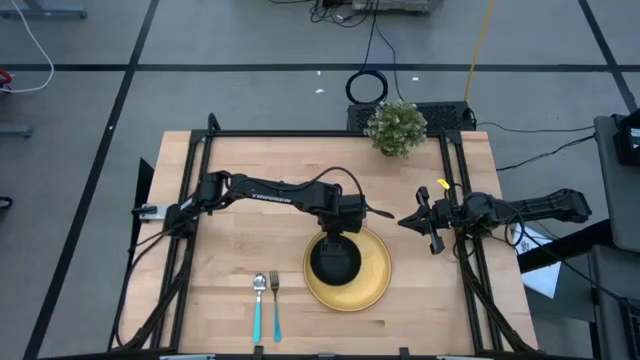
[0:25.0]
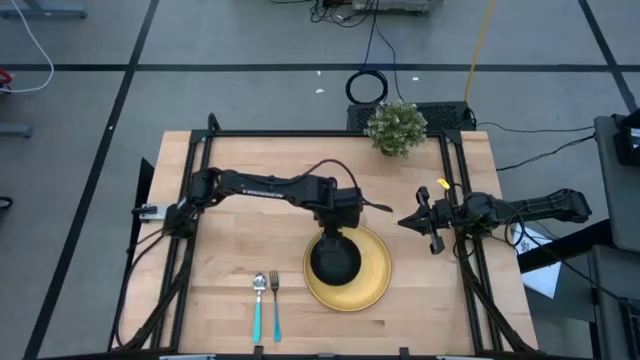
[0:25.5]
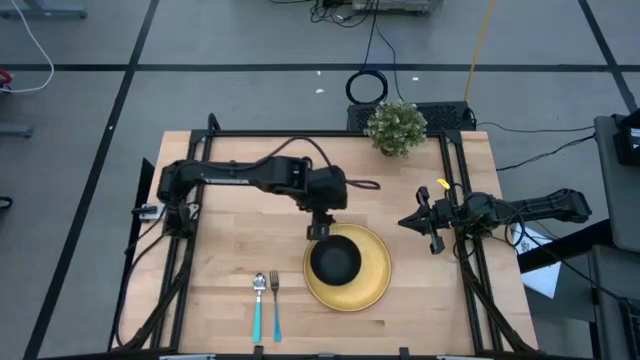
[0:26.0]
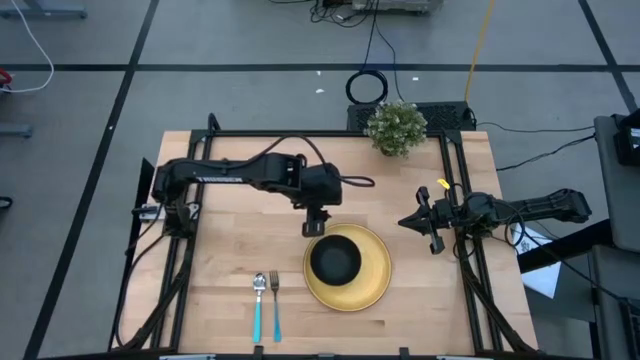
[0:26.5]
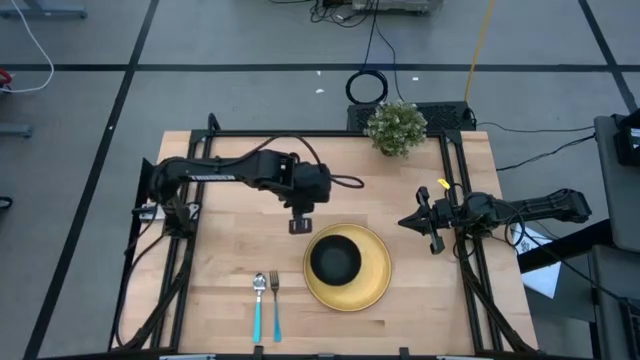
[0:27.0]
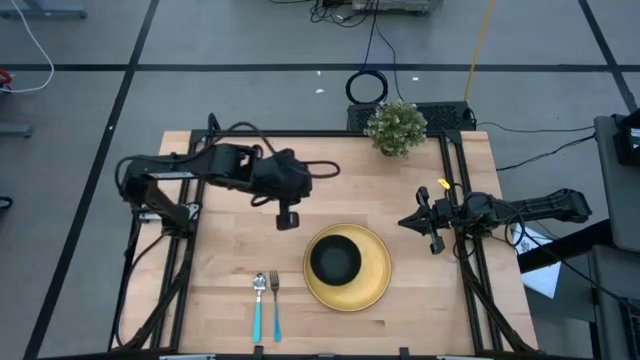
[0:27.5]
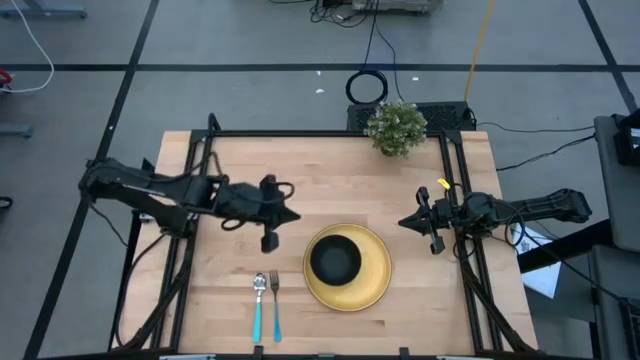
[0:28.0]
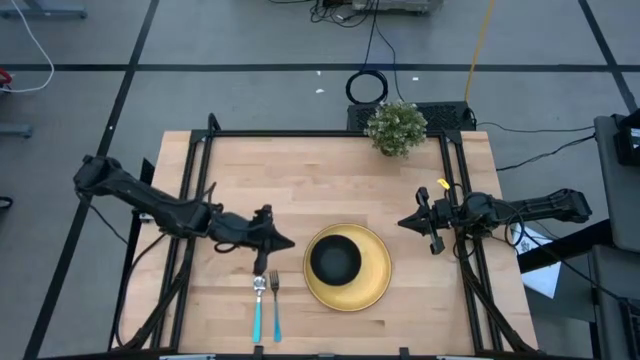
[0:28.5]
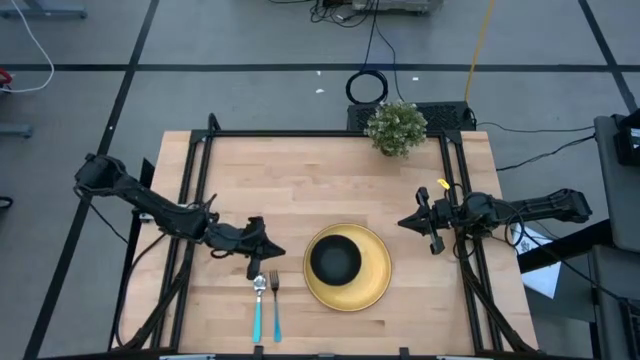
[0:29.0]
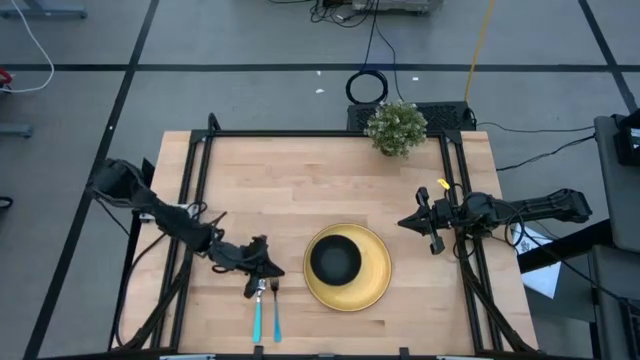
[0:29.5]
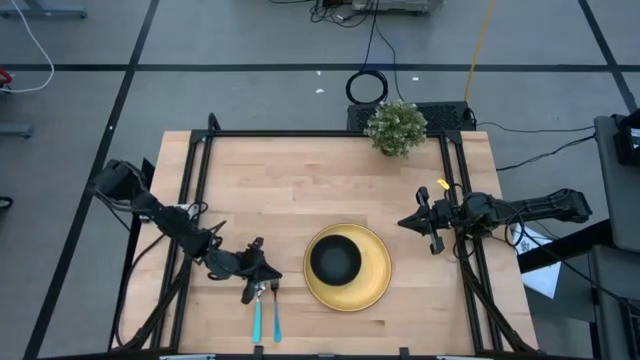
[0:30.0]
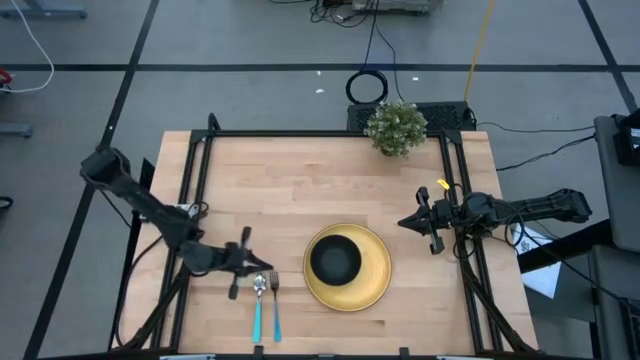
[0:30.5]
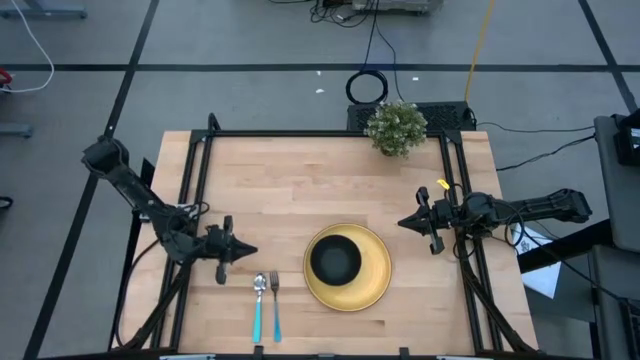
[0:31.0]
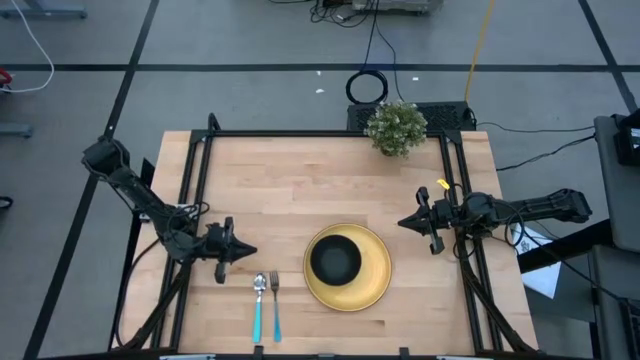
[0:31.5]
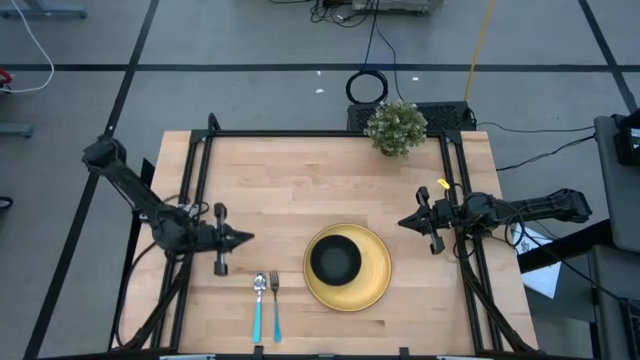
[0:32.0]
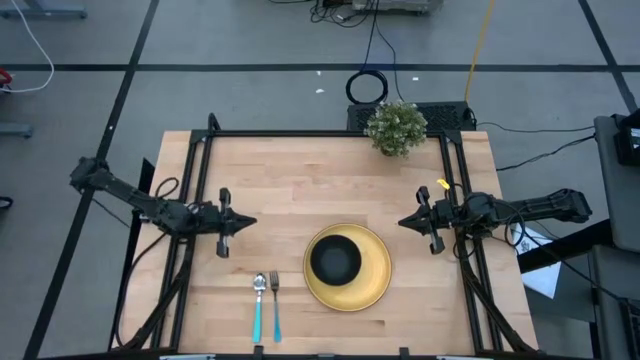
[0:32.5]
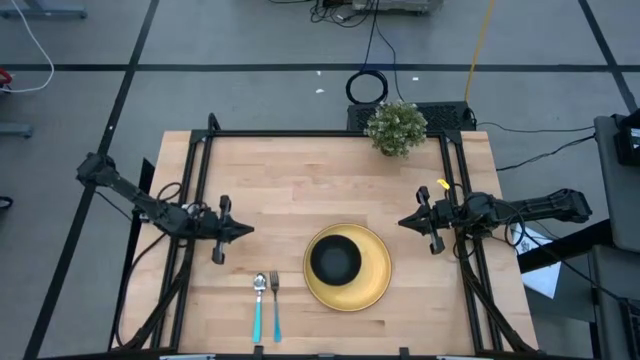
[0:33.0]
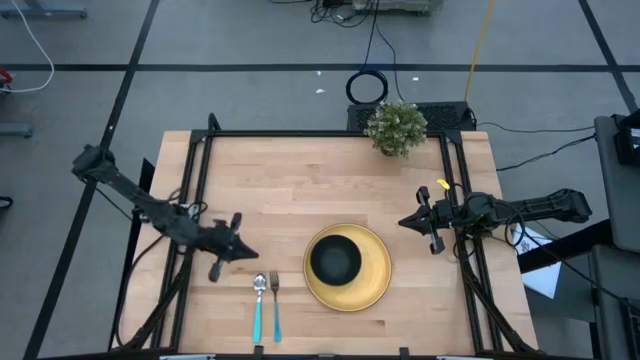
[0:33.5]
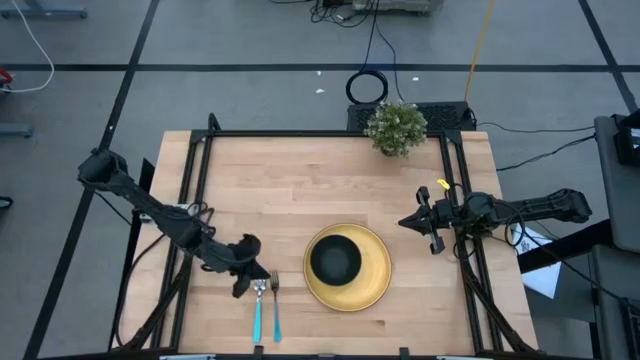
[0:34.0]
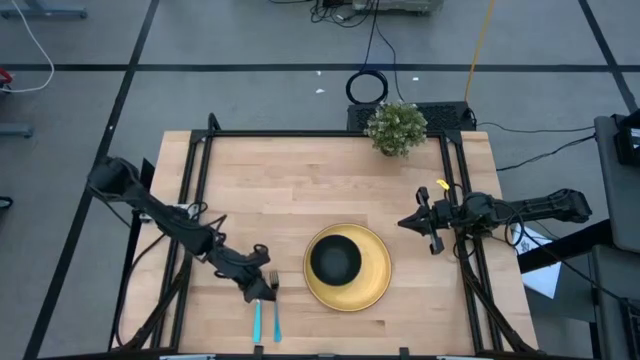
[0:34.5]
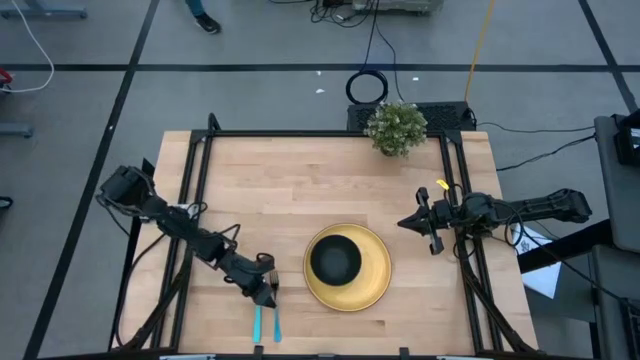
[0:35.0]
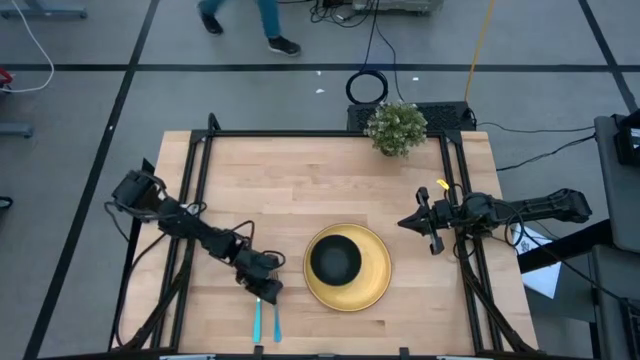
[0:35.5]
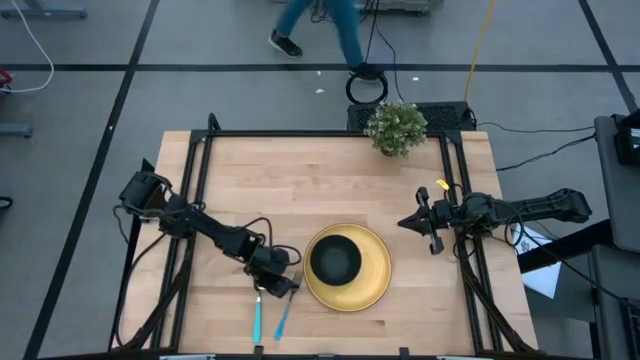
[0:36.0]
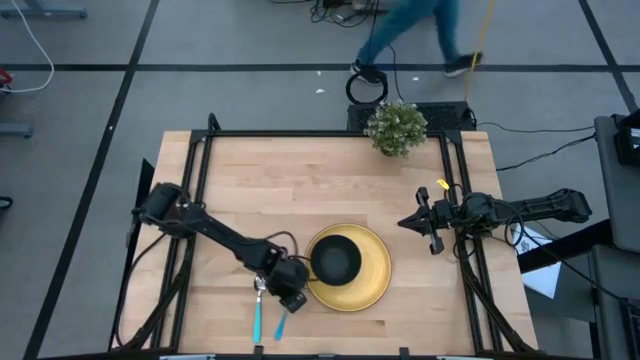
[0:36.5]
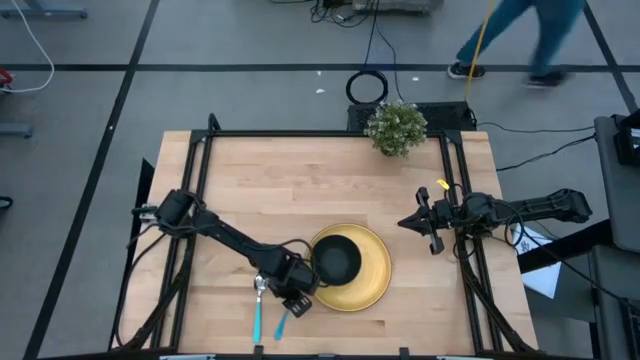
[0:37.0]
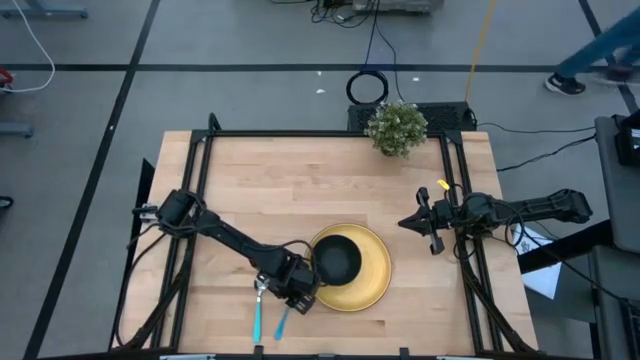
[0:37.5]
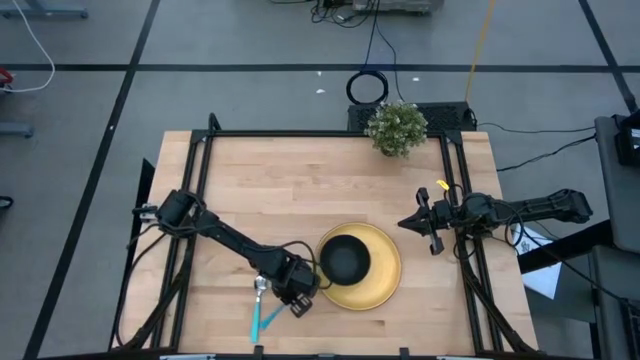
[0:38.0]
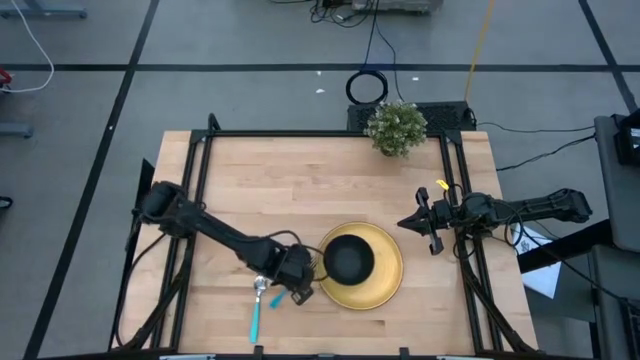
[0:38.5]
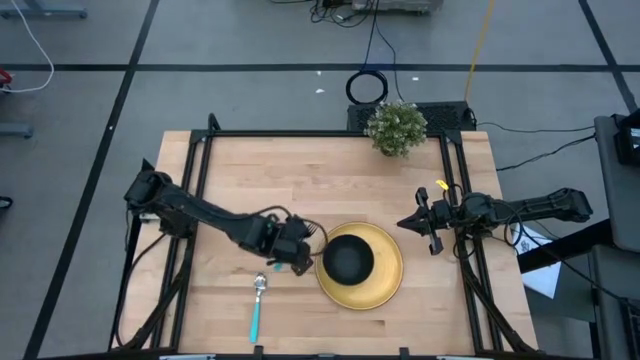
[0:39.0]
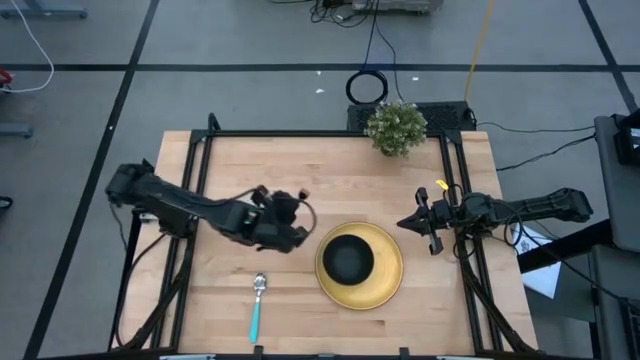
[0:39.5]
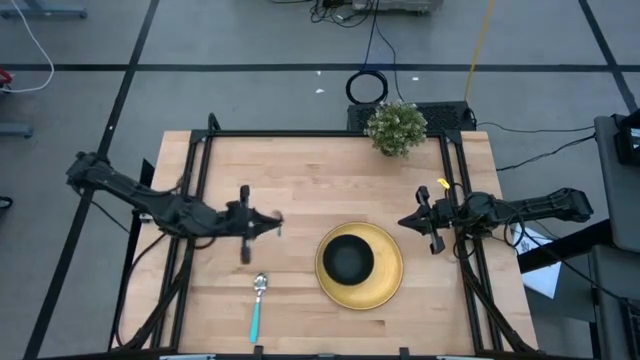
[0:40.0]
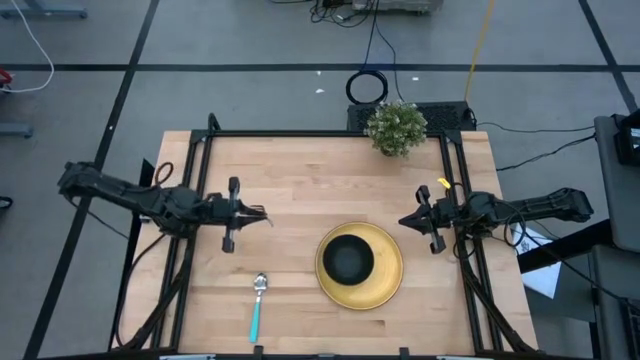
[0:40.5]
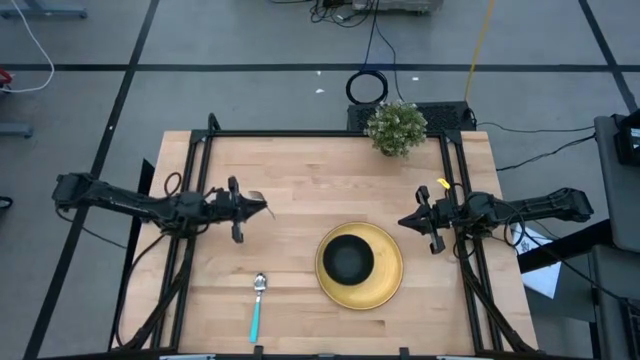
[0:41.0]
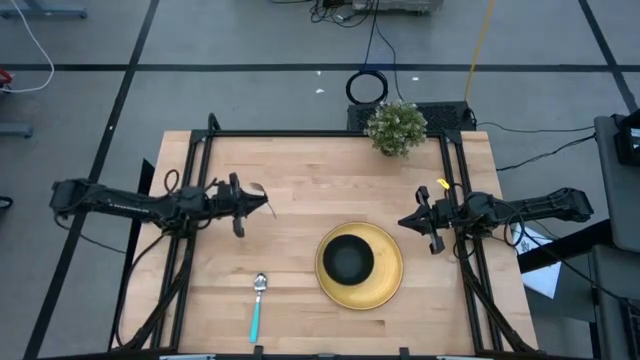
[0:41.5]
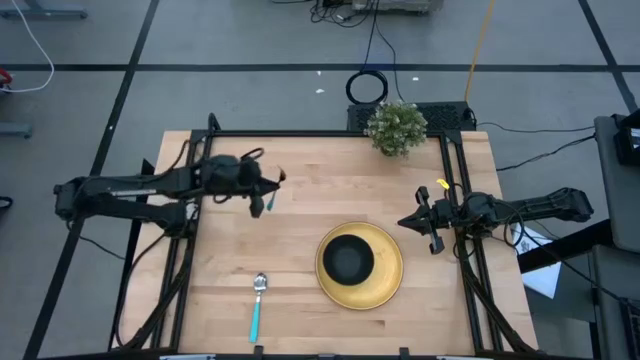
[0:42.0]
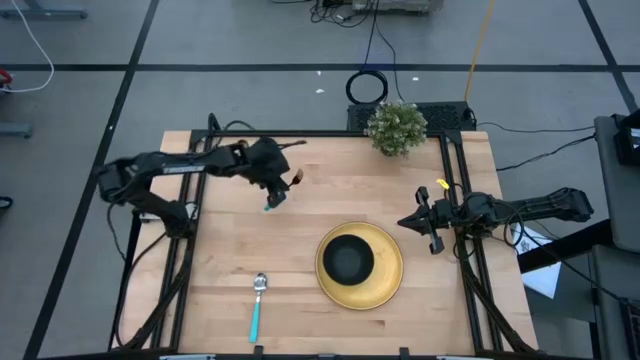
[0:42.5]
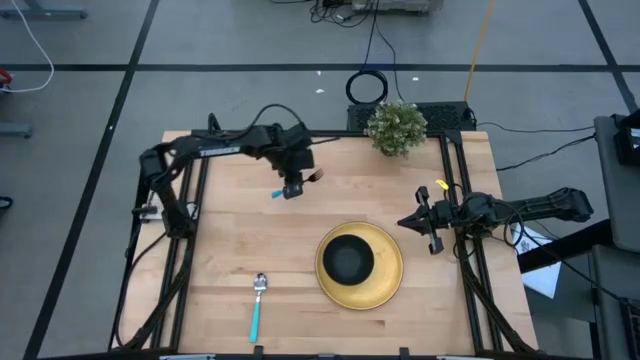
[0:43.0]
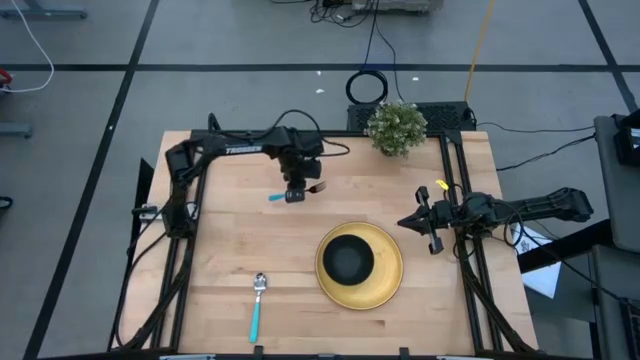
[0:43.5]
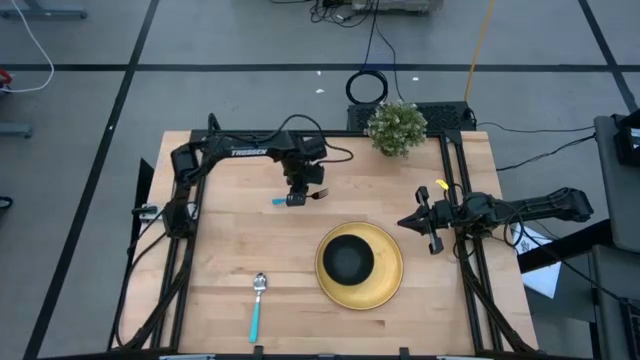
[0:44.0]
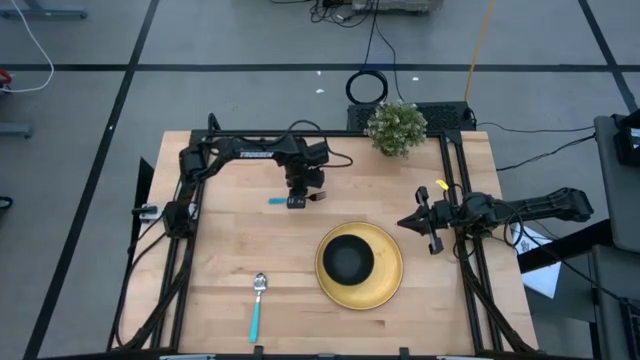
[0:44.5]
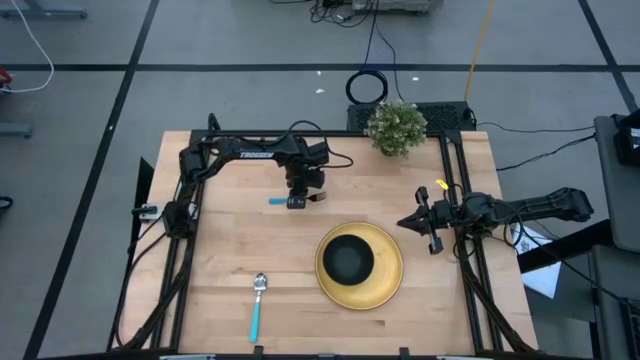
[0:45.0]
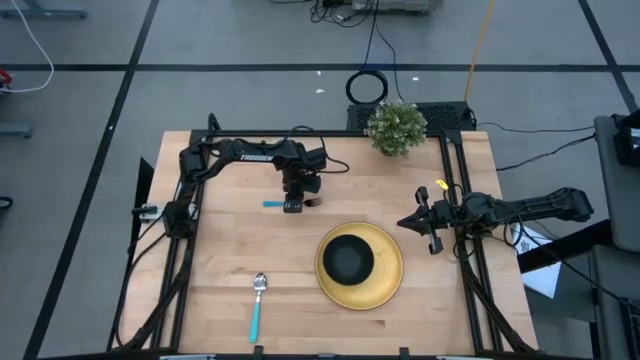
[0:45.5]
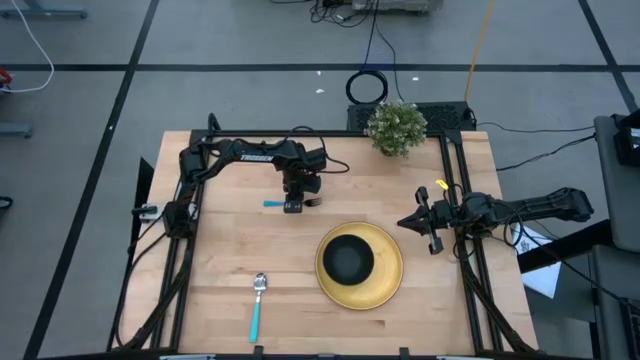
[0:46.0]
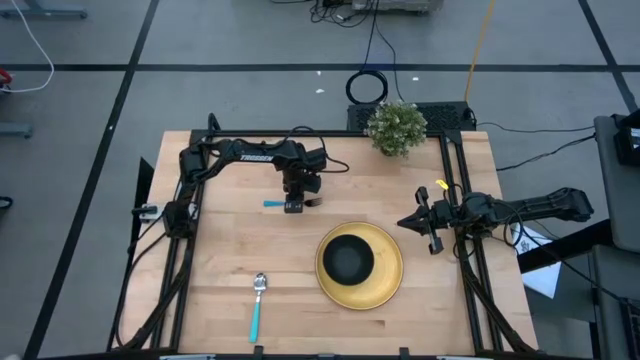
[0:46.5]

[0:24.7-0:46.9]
Task: Set table place
Put the blue fork on the yellow plate to the right of the black bowl
